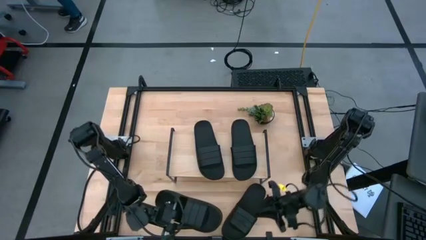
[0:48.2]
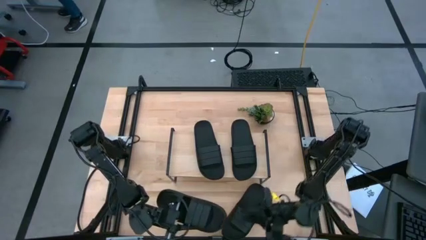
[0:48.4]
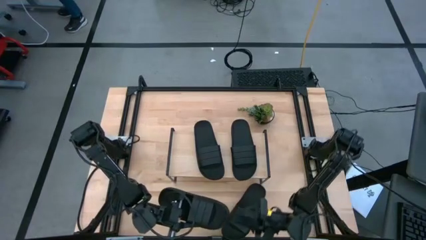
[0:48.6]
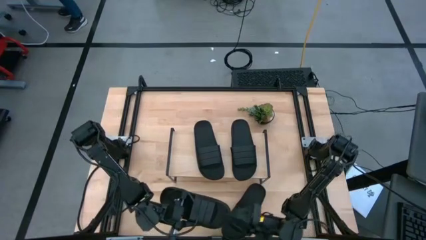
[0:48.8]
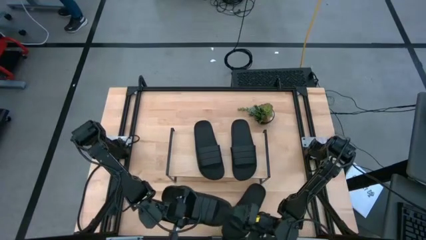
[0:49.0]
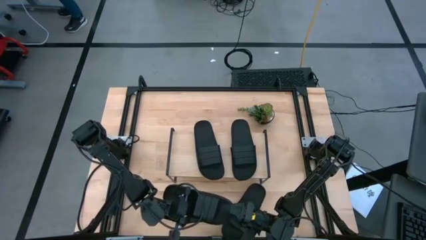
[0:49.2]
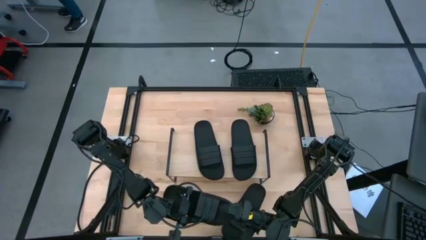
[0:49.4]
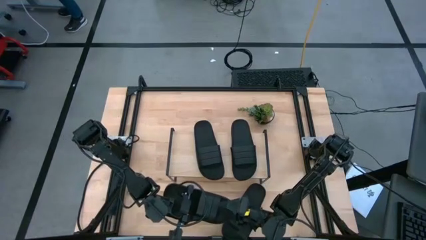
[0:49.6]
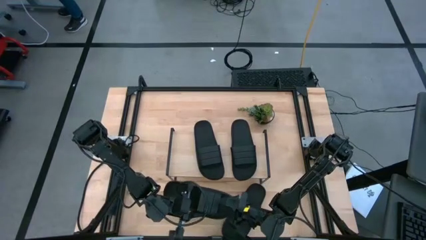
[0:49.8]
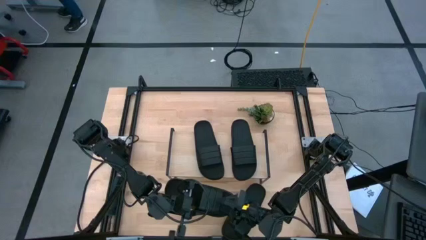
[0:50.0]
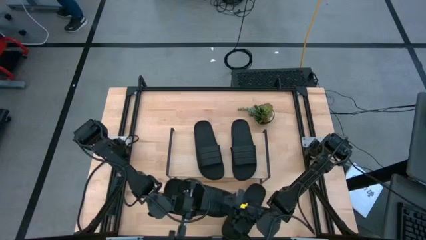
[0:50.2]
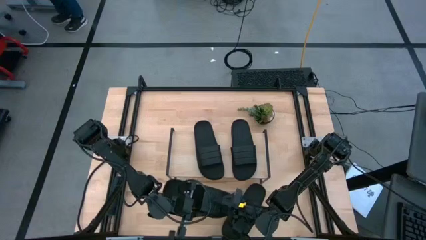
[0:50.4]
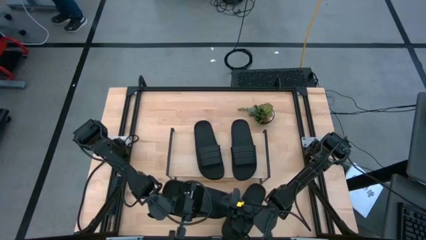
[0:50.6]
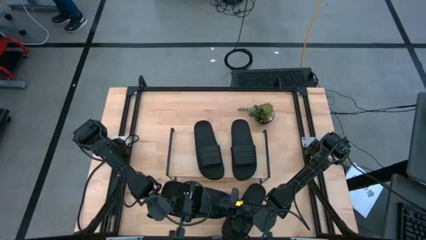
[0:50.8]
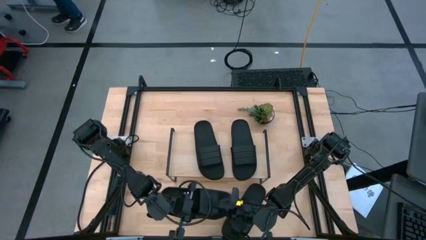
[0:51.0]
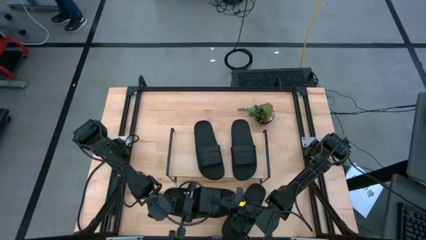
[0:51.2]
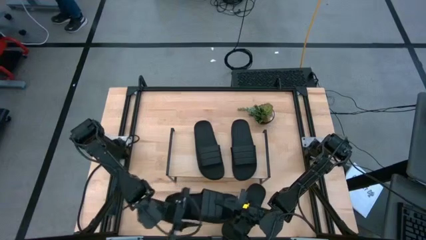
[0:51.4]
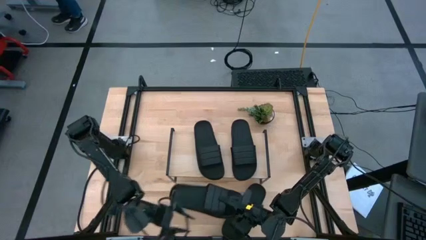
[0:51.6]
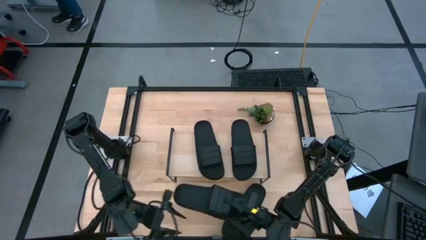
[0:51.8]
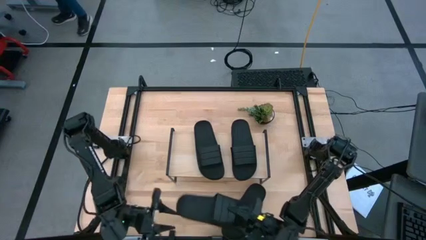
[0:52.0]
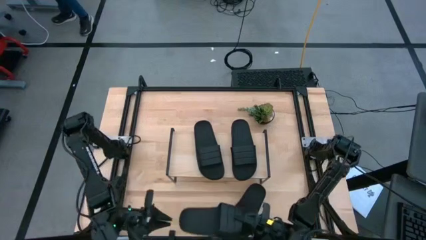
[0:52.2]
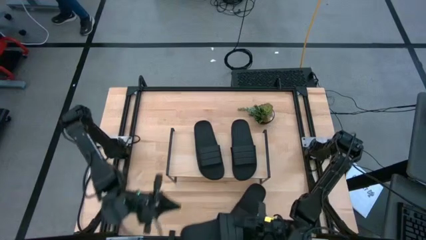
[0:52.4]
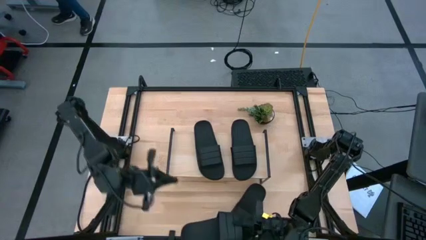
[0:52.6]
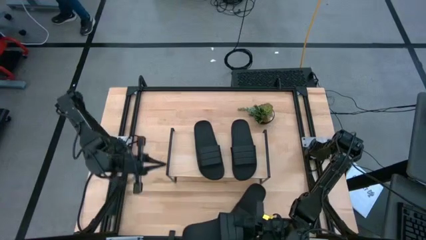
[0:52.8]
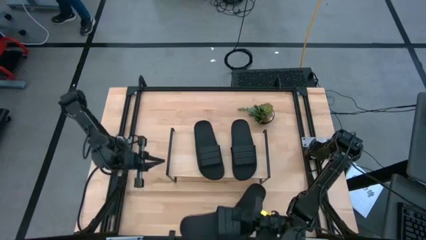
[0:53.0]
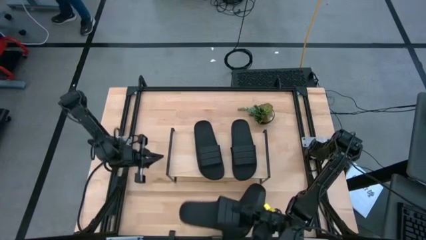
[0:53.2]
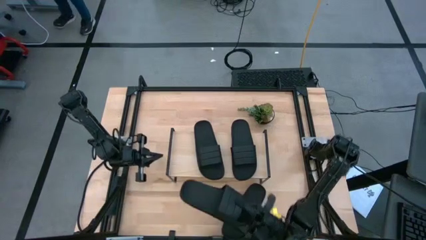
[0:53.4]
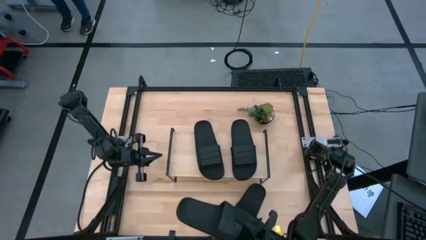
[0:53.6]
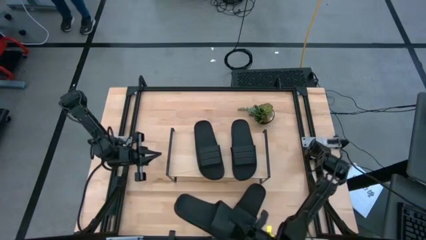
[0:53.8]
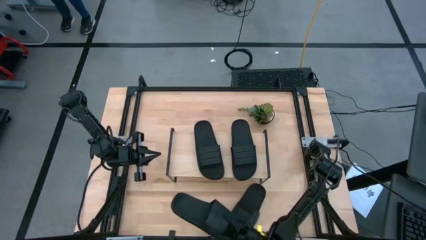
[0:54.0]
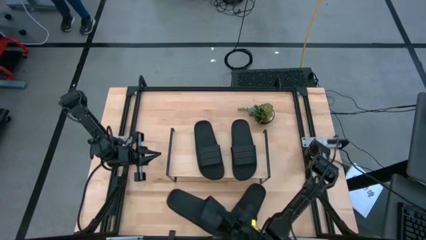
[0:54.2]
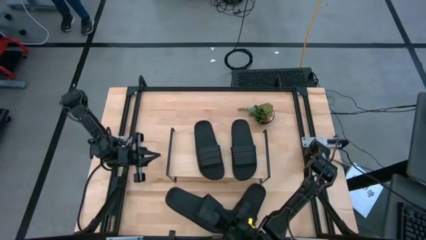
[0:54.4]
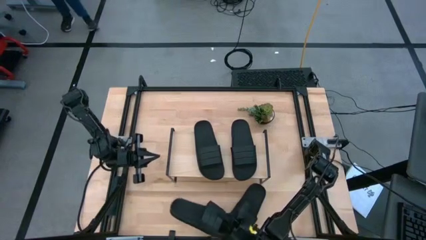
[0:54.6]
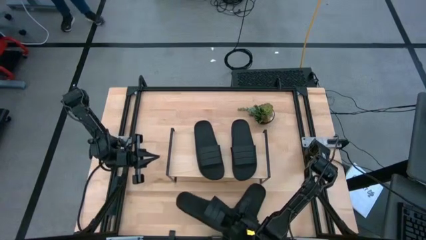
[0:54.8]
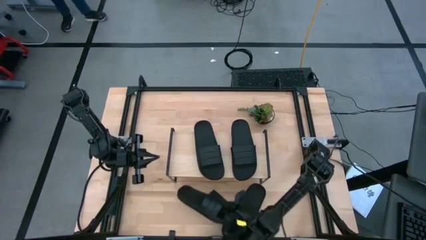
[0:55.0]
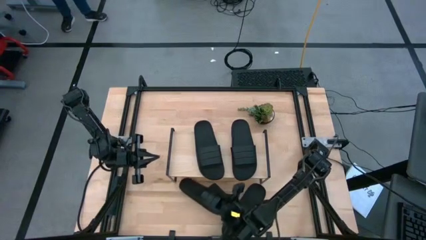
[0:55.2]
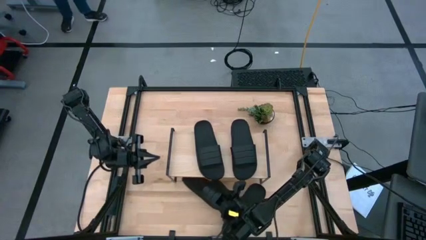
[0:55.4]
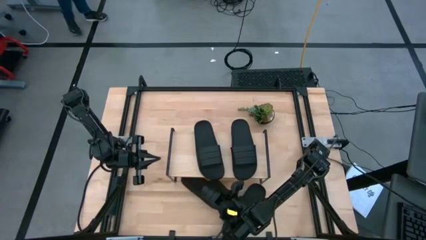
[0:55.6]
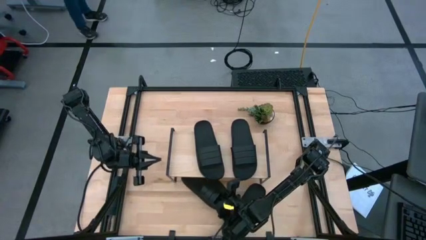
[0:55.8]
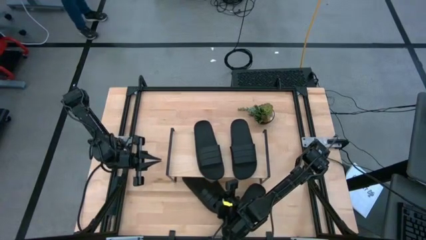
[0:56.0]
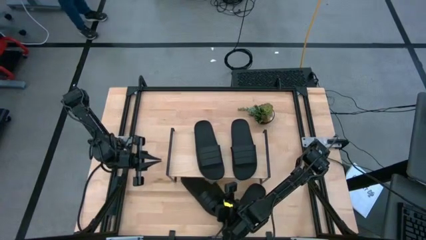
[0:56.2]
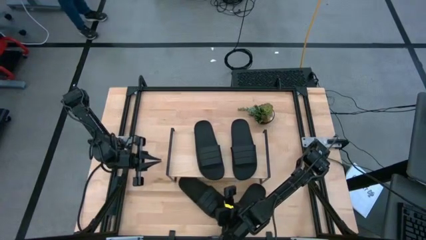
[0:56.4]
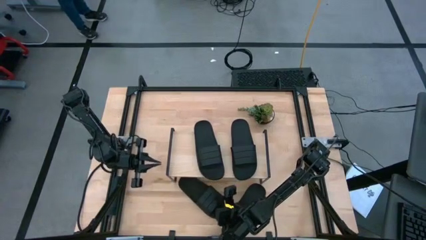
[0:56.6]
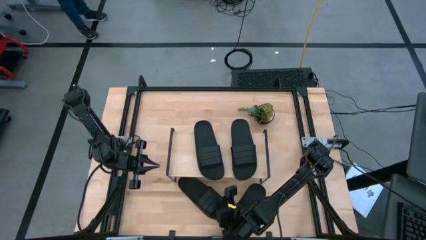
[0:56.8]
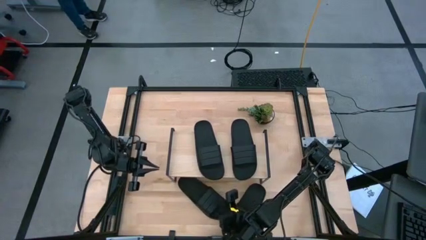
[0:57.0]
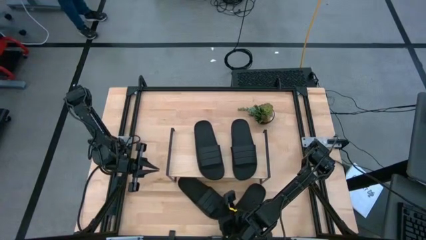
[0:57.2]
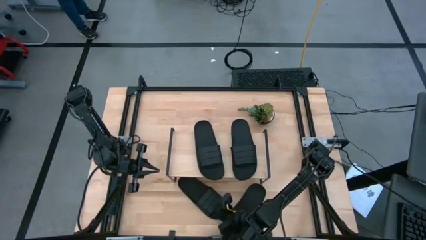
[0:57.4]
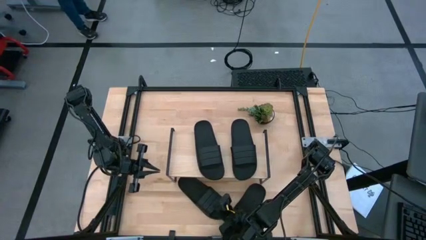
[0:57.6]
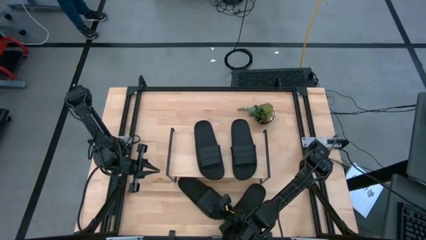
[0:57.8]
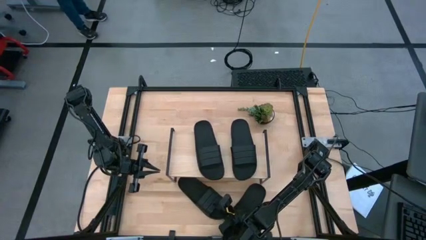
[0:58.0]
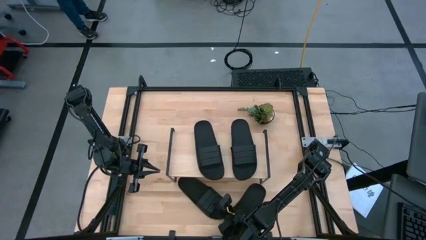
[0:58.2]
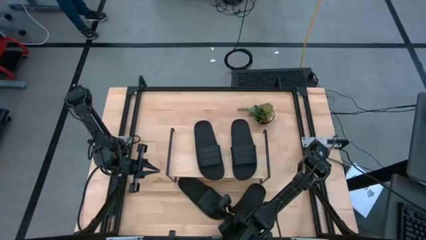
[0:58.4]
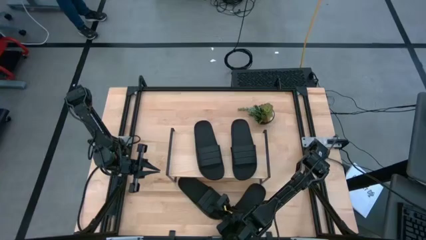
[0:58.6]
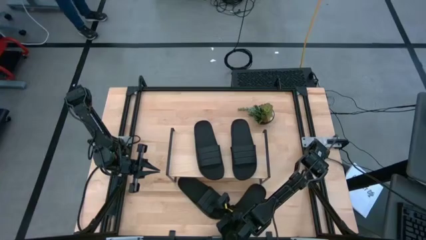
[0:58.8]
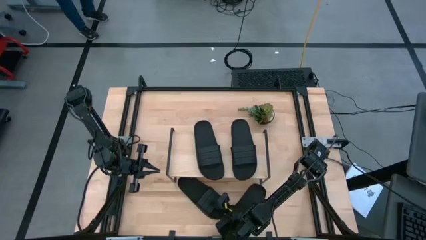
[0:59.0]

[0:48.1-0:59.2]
Task: Pick and place slides into the shelf
Put the black slide under the shelf

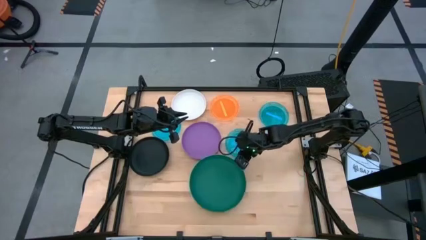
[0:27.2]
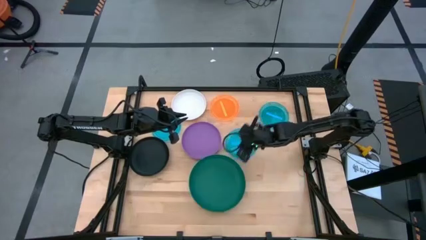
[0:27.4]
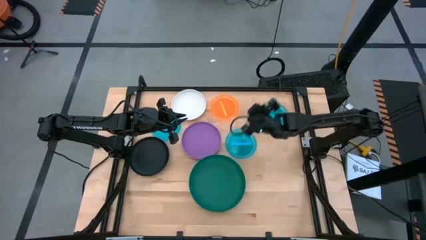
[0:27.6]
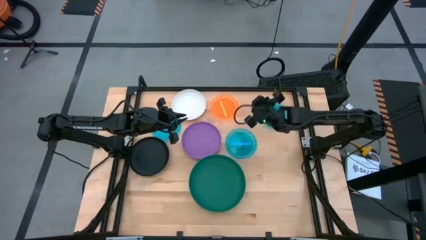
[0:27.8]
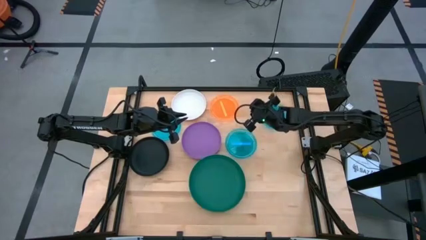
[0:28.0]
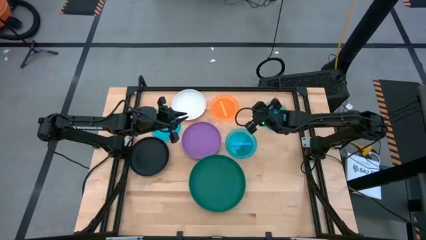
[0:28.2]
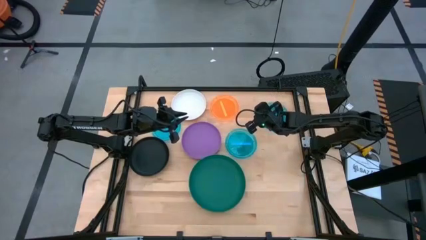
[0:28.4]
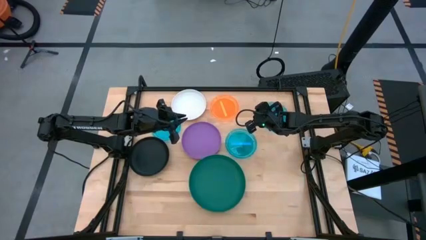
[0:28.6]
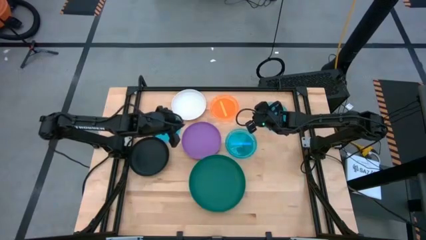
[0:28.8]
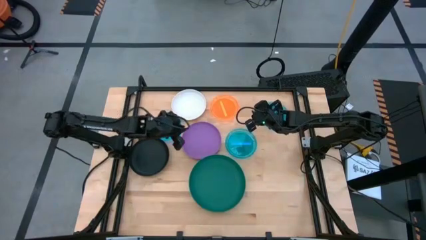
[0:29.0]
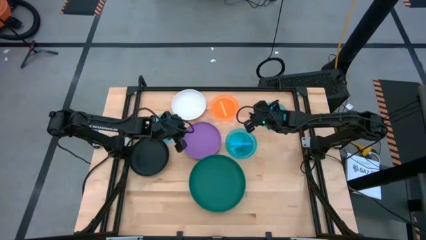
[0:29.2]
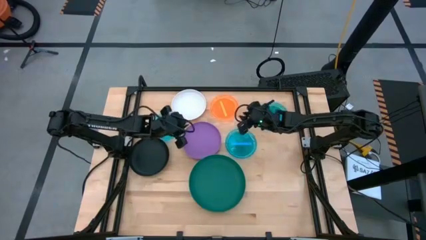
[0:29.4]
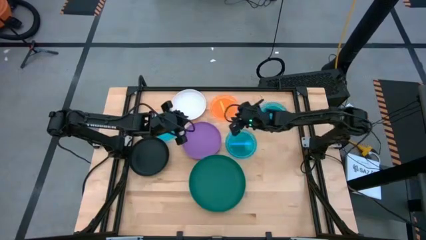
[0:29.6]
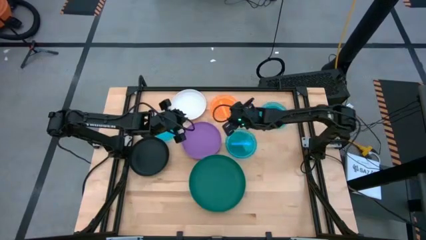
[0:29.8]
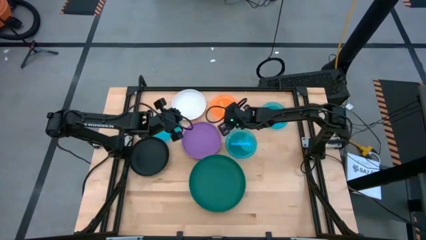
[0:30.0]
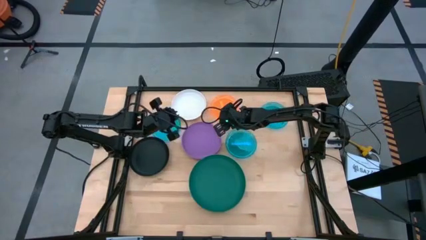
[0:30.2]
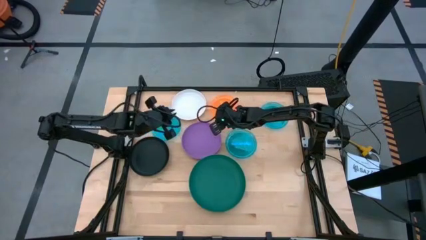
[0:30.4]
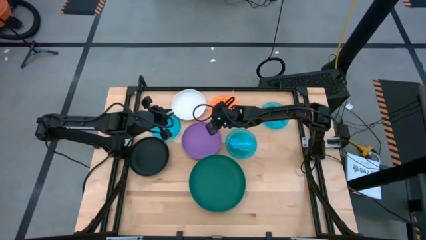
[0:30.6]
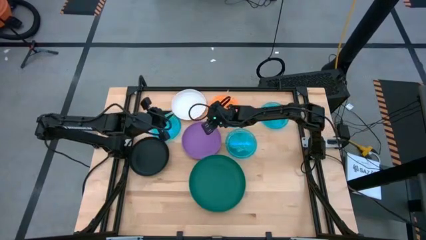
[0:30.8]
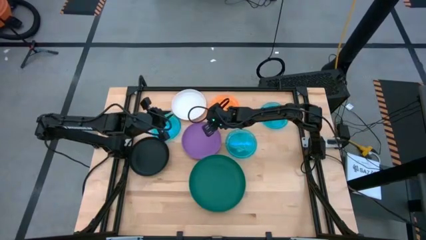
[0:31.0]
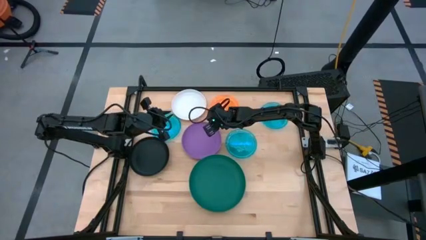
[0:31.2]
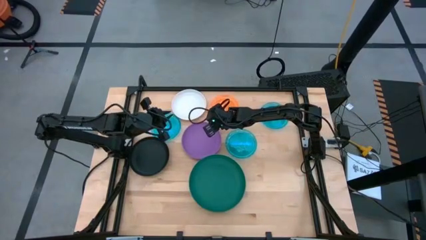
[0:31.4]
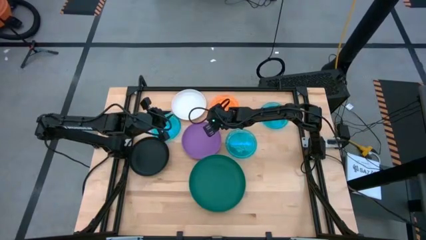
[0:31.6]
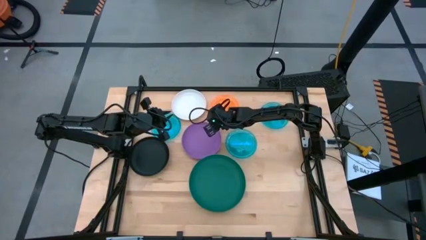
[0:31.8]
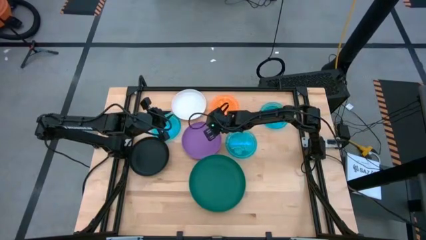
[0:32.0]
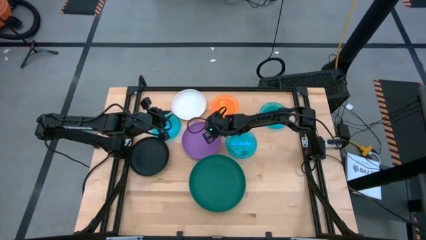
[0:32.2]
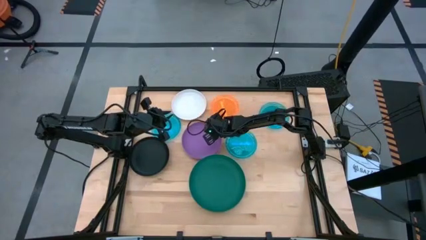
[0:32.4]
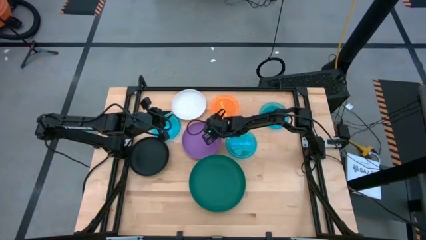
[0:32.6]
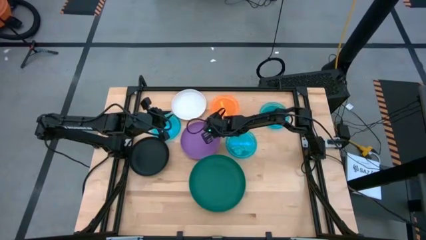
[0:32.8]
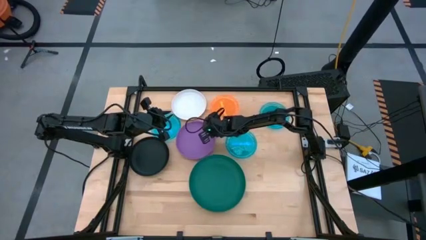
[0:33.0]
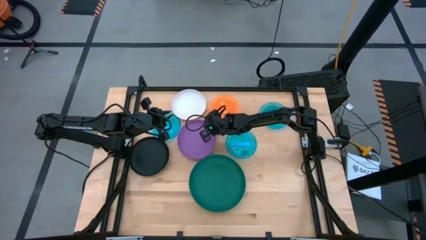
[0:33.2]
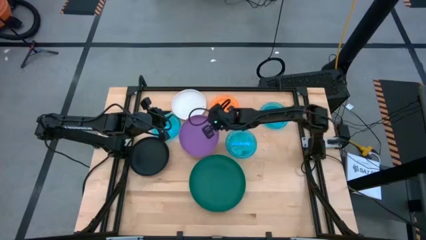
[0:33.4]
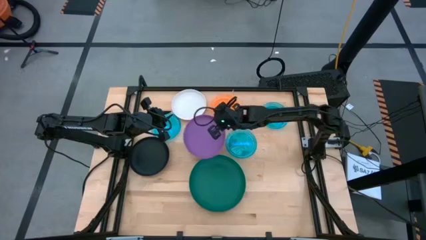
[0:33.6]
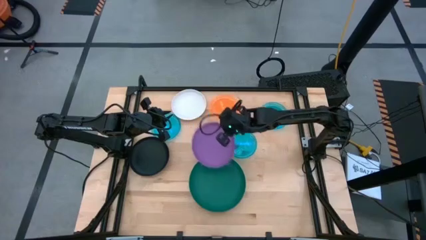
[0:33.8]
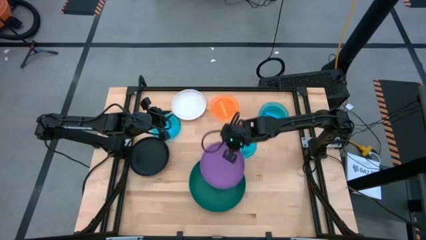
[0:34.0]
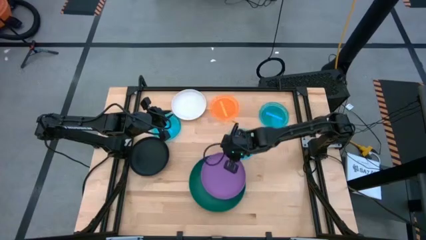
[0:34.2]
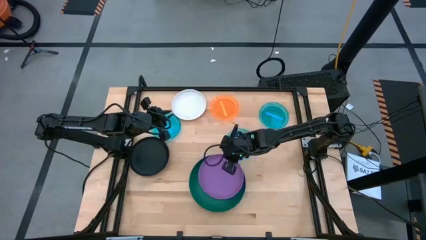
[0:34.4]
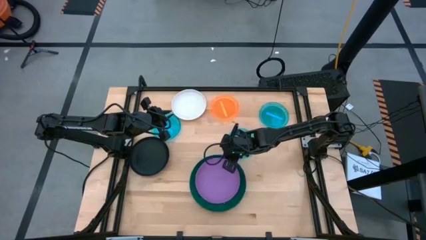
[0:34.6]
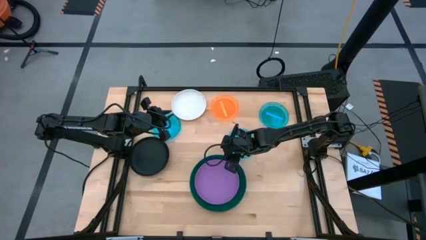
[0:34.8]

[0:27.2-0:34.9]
Task: Stack plastic plates
Stack the purple plate on top of the dark green plate
